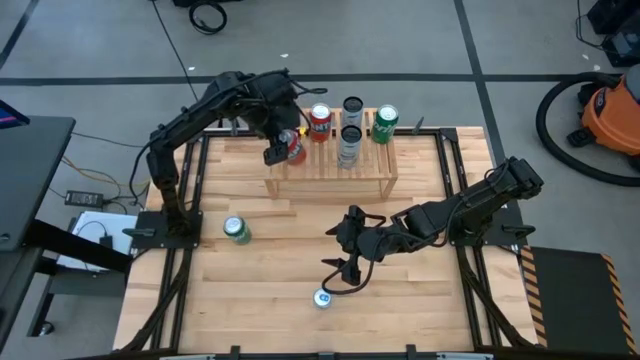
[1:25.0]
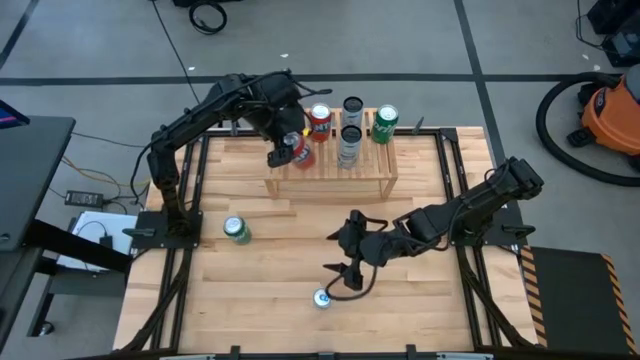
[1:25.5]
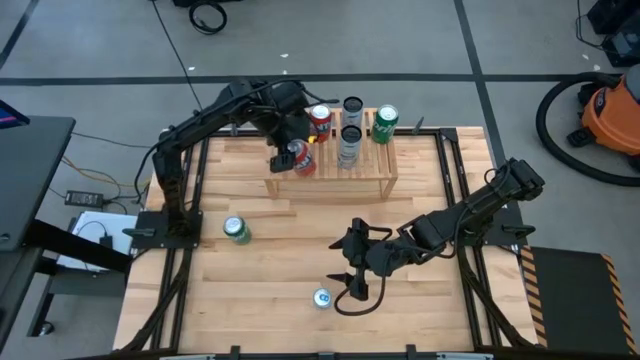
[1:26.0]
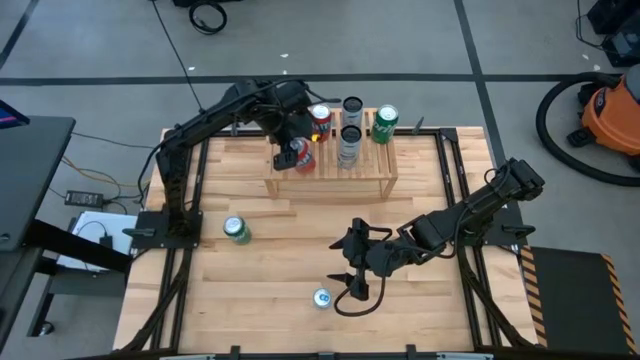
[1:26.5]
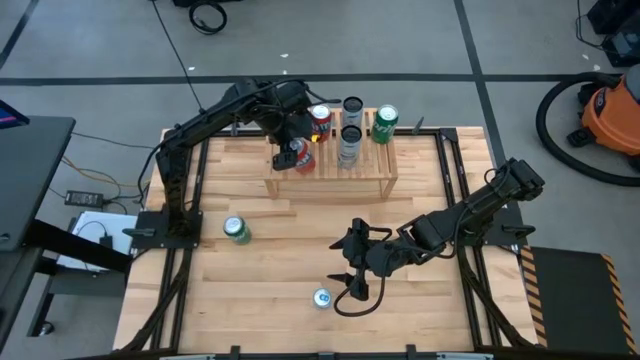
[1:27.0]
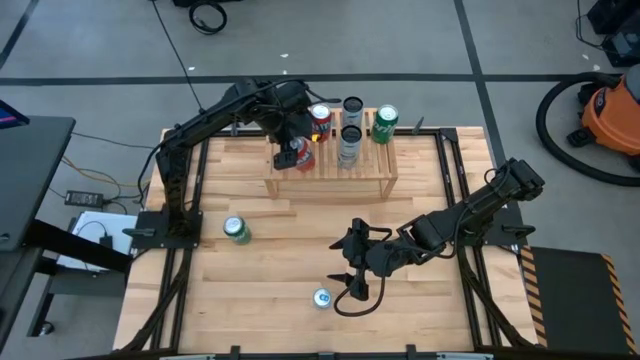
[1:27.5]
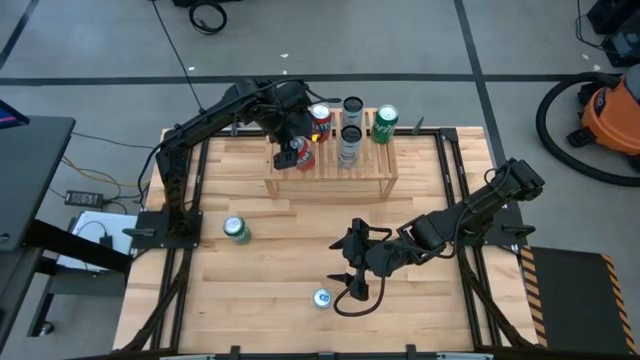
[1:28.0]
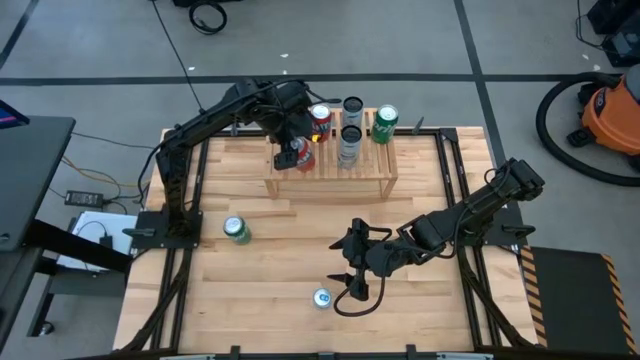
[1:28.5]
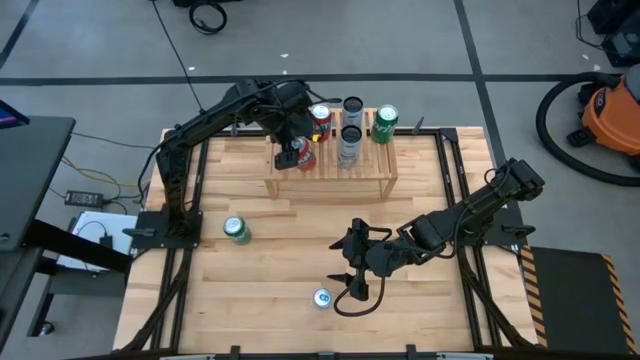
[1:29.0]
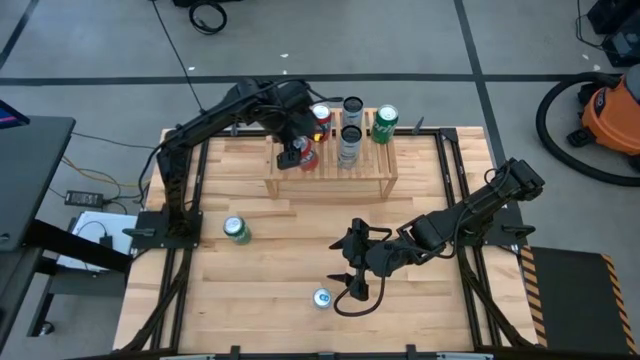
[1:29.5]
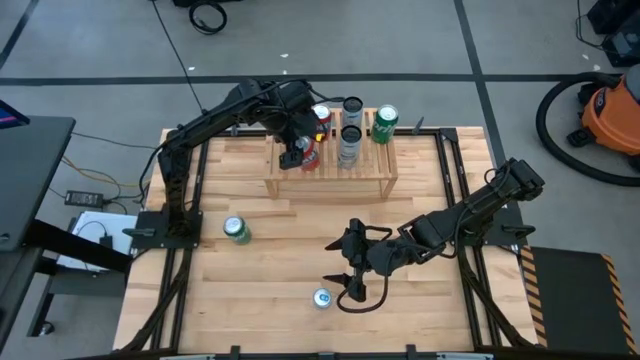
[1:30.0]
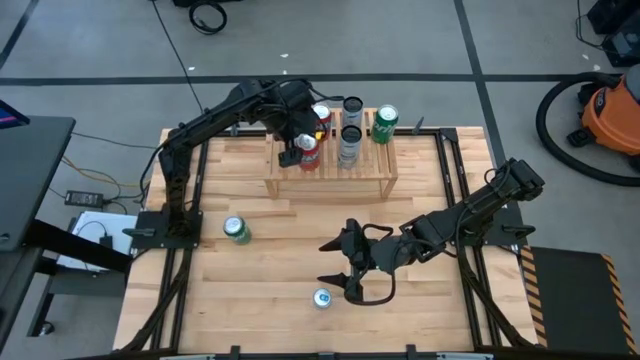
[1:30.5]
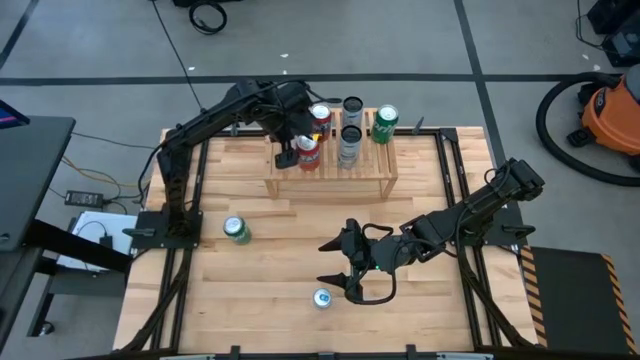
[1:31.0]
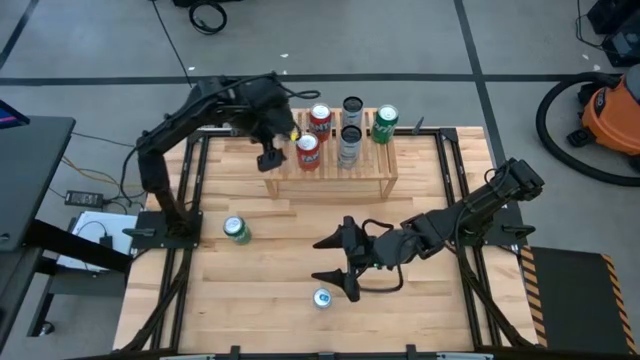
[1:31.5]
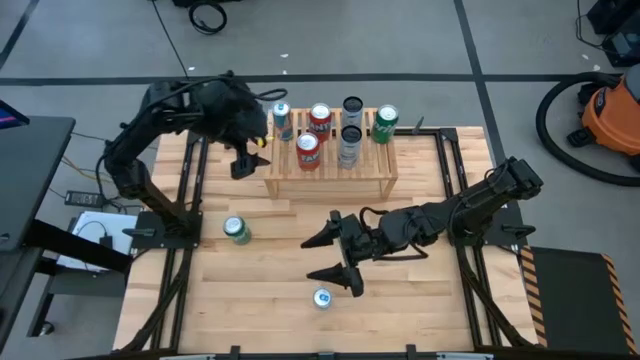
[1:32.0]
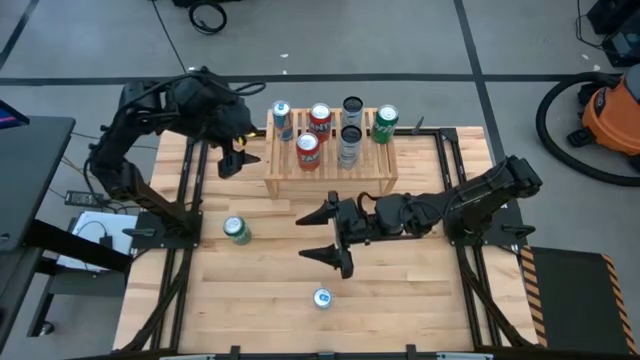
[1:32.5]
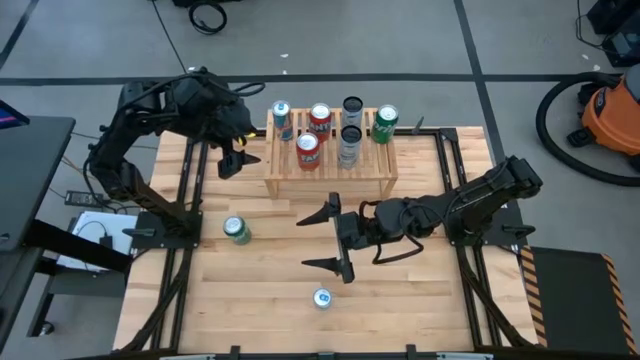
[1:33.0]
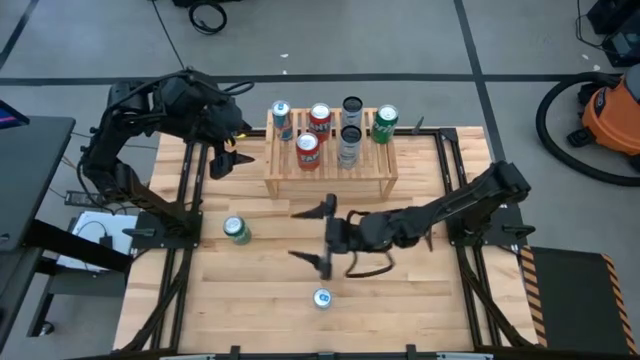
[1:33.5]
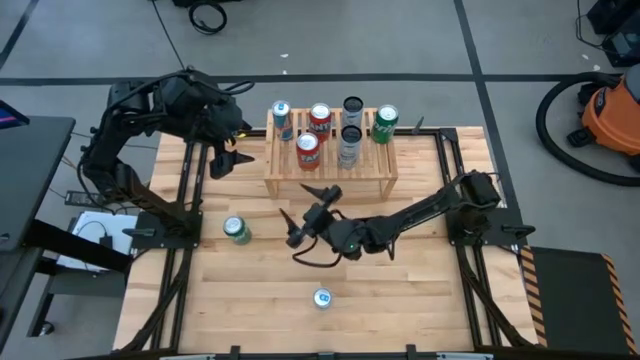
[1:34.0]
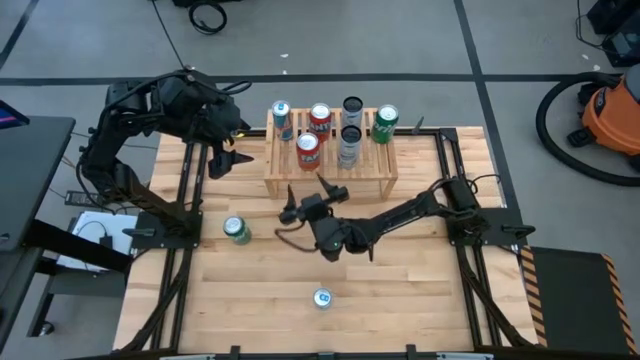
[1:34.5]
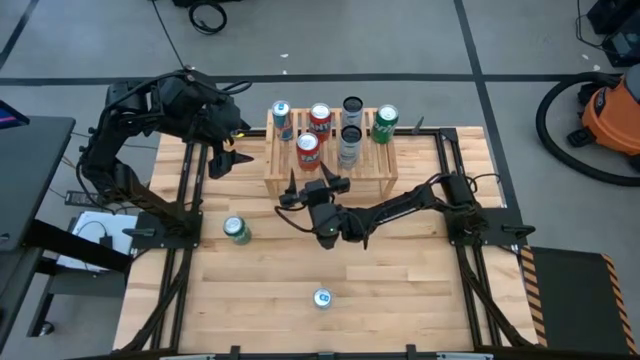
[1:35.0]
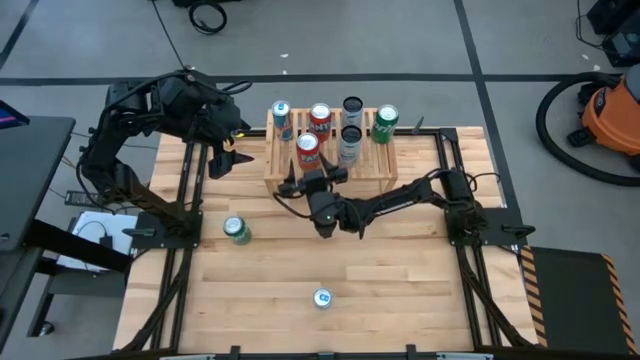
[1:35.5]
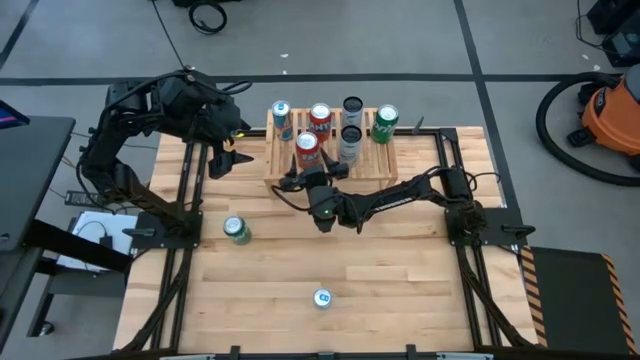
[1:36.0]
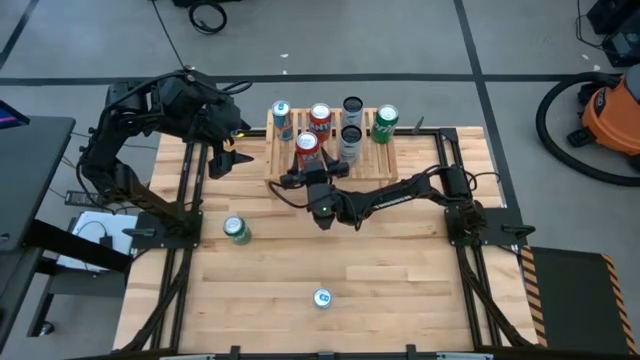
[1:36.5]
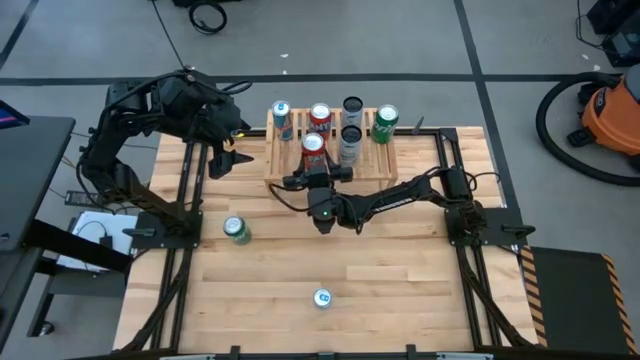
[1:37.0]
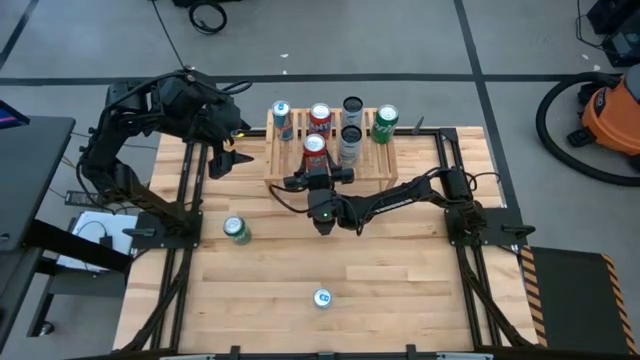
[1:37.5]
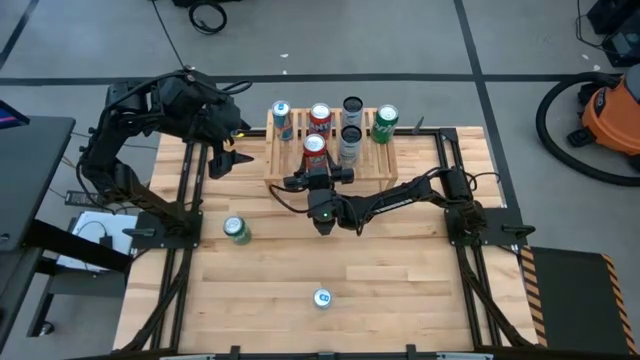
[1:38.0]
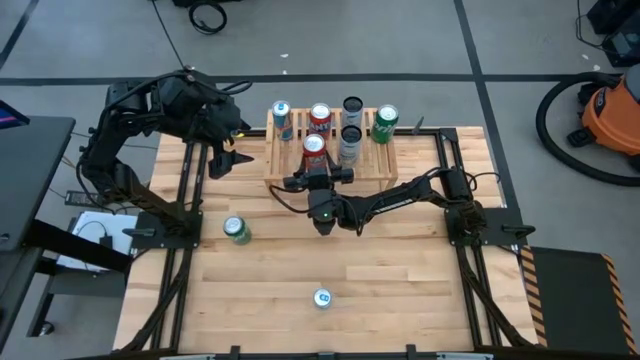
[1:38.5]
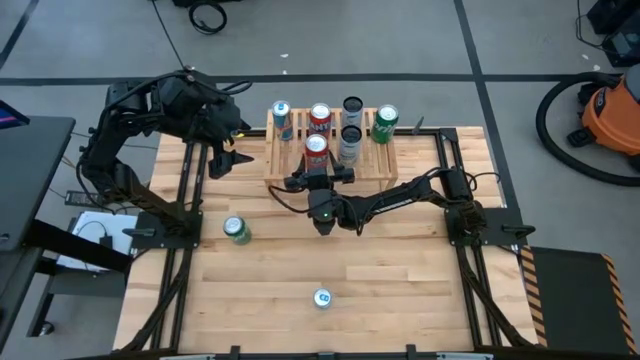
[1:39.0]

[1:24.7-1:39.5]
Task: Place canned beverage on shelf
Put the red soda can on the shelf aligned with the other red soda can

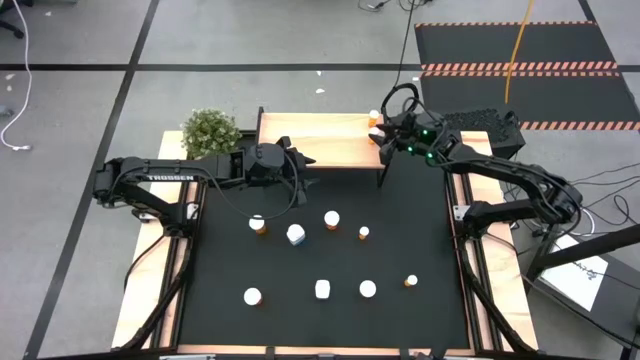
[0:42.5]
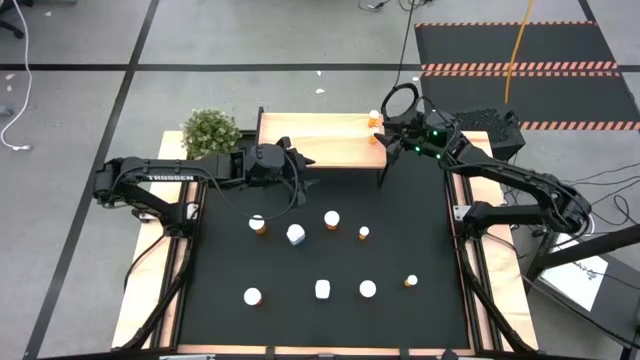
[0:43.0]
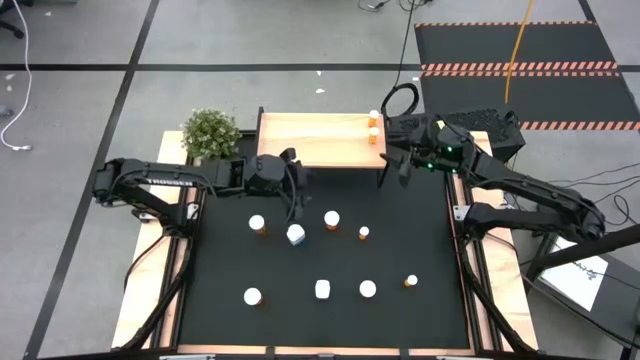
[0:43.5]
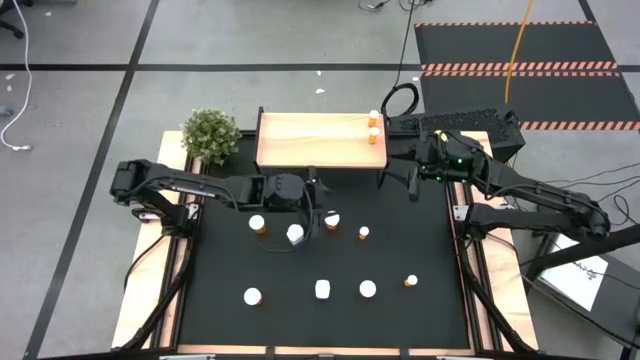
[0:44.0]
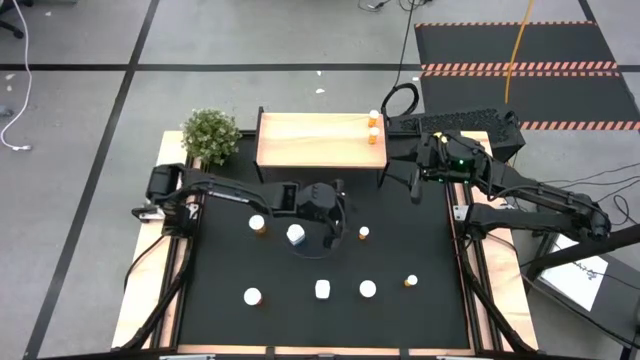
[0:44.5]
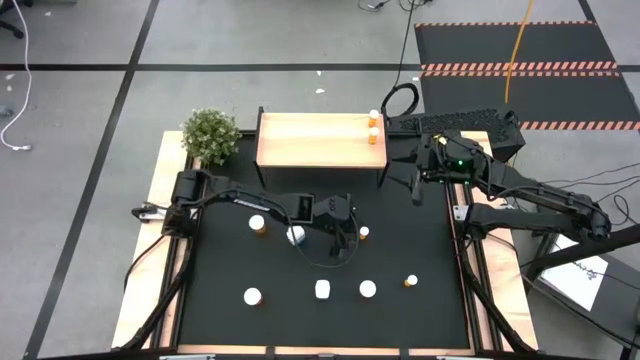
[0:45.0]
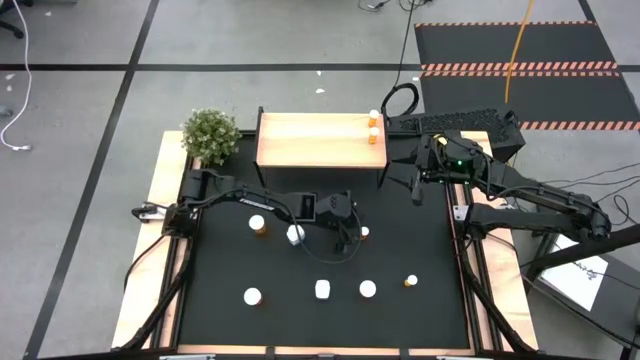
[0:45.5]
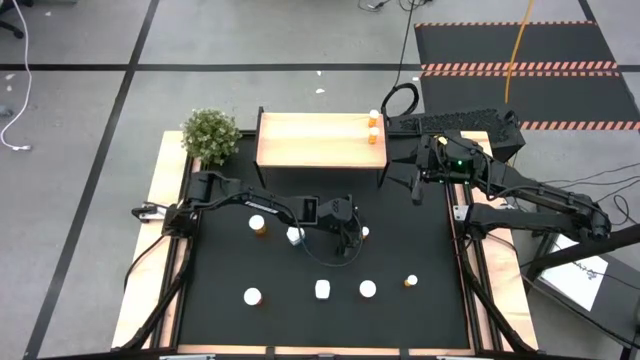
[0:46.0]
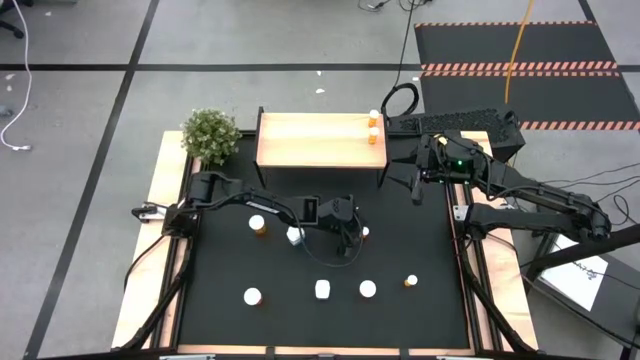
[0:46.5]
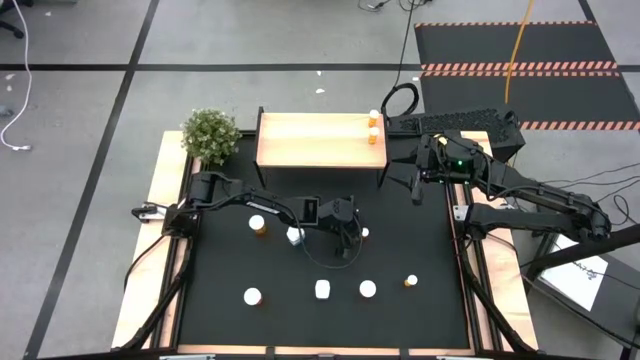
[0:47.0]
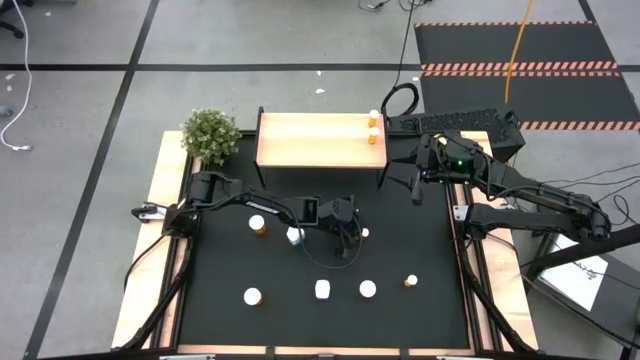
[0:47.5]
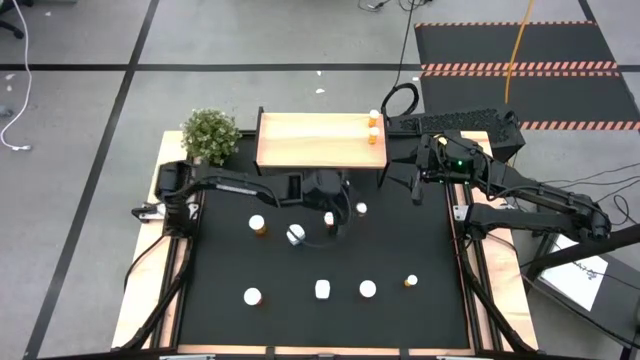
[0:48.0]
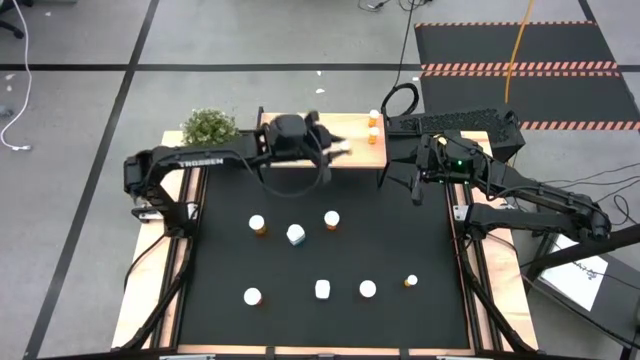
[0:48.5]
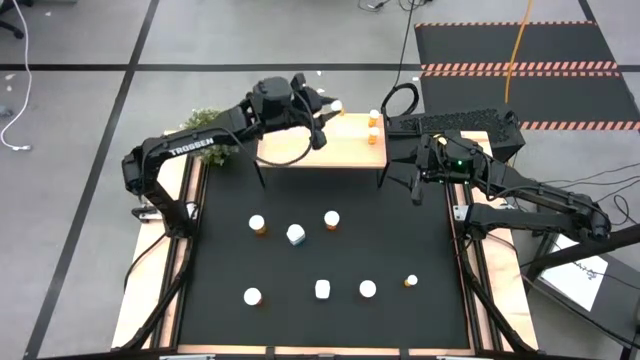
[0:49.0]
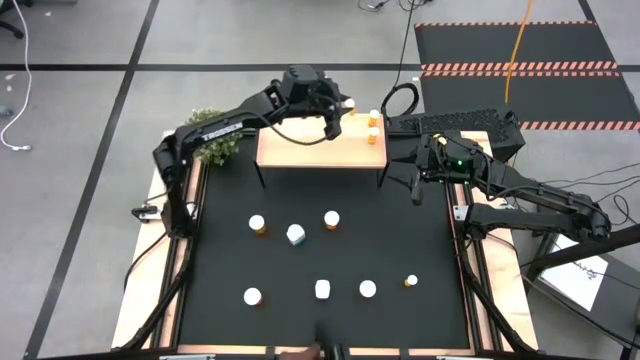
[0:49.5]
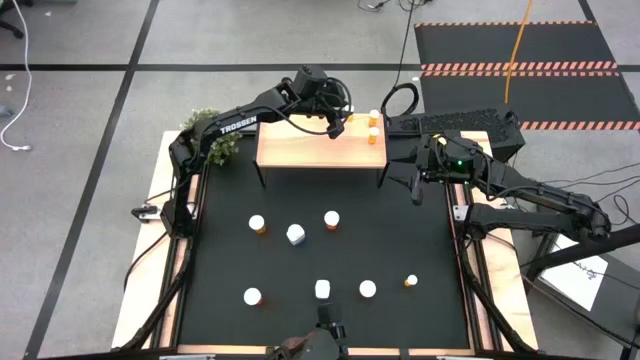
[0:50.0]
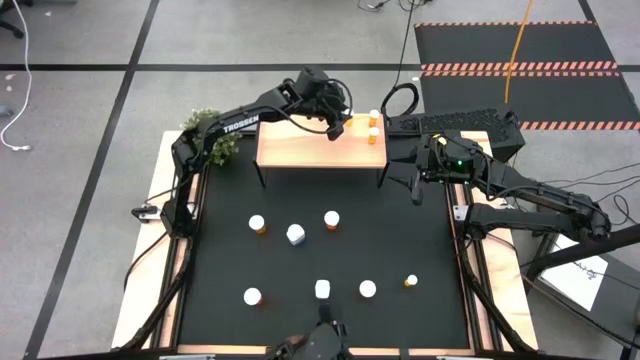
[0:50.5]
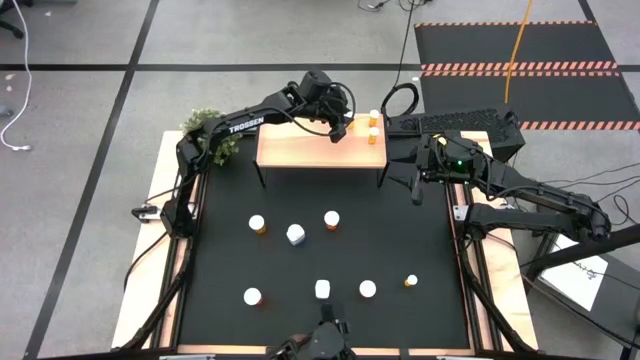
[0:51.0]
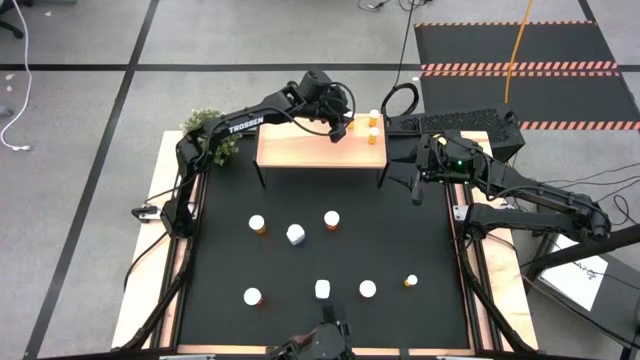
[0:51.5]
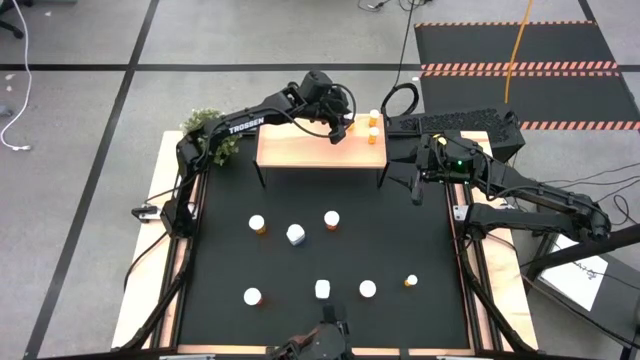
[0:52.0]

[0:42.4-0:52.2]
Task: Pick and place medicine bottles onto shelf by color
Put the small orange pill bottle on the shelf
